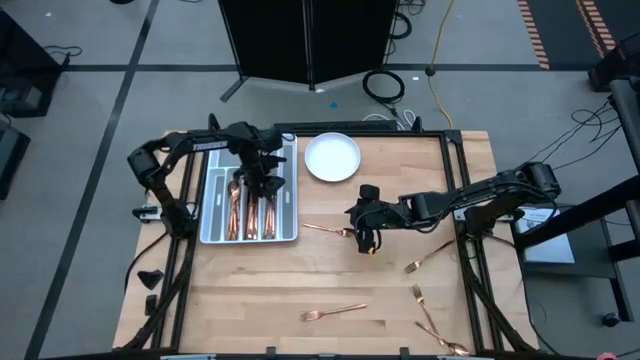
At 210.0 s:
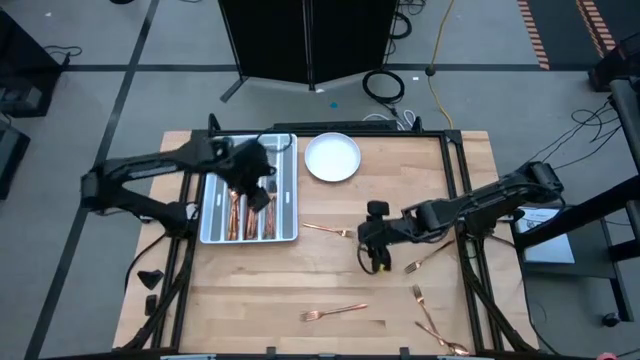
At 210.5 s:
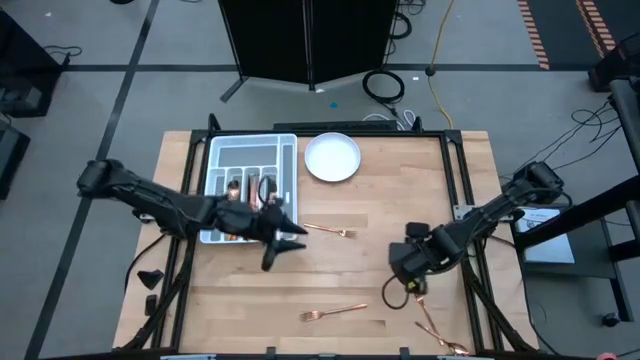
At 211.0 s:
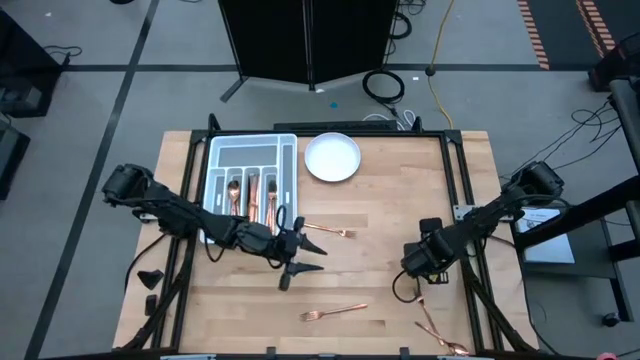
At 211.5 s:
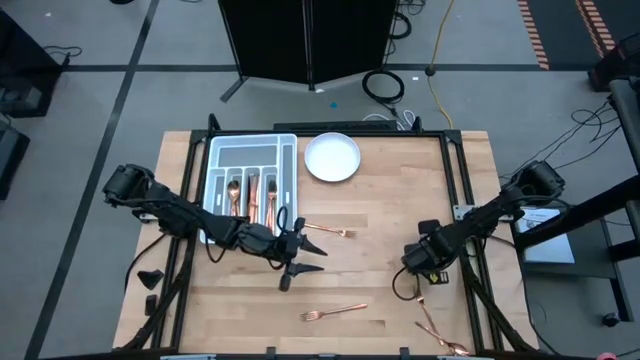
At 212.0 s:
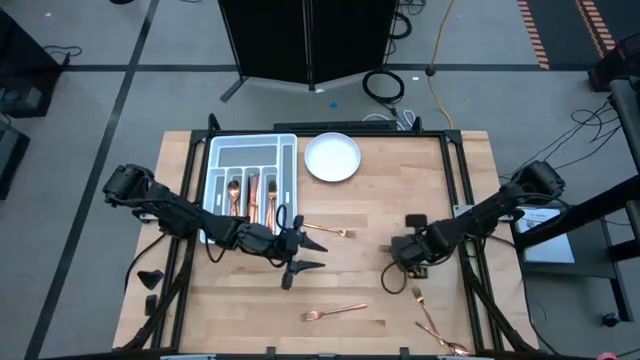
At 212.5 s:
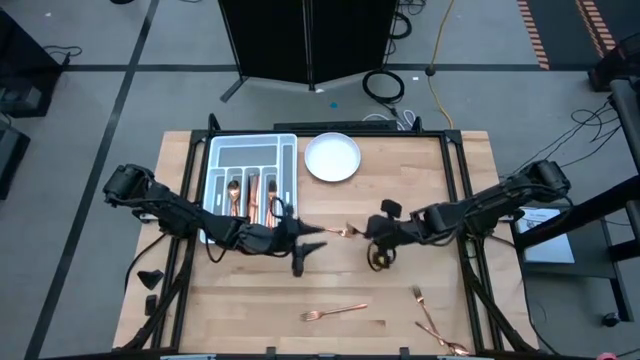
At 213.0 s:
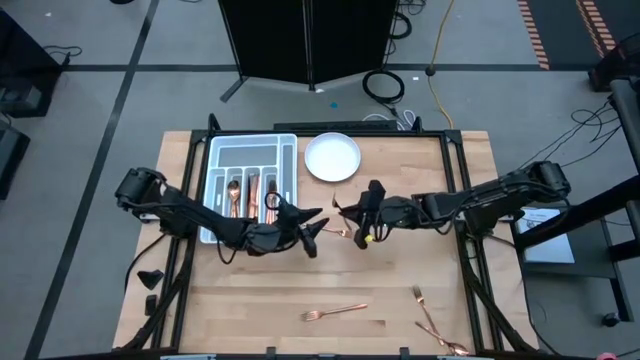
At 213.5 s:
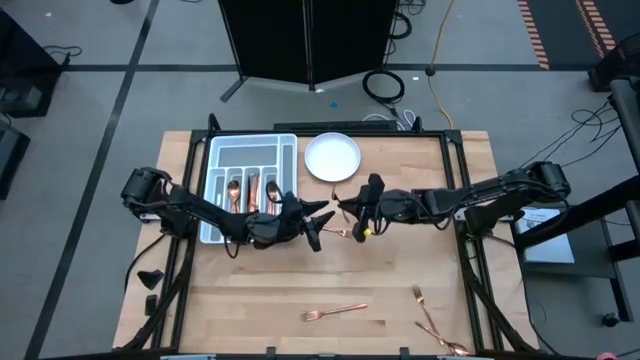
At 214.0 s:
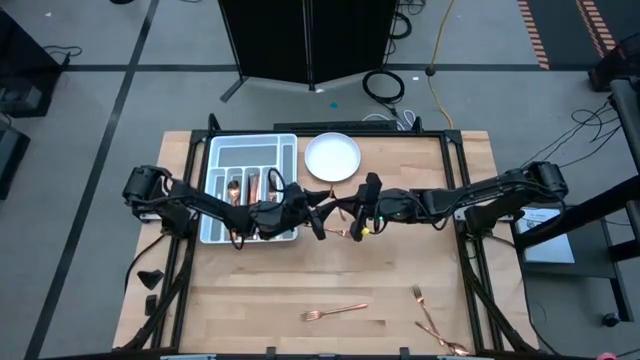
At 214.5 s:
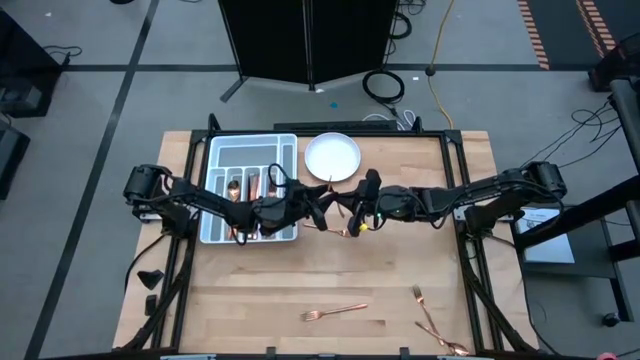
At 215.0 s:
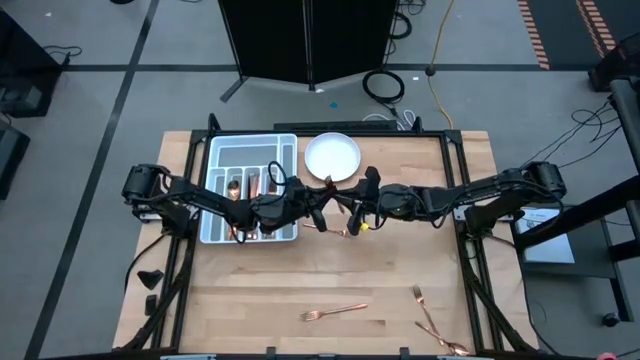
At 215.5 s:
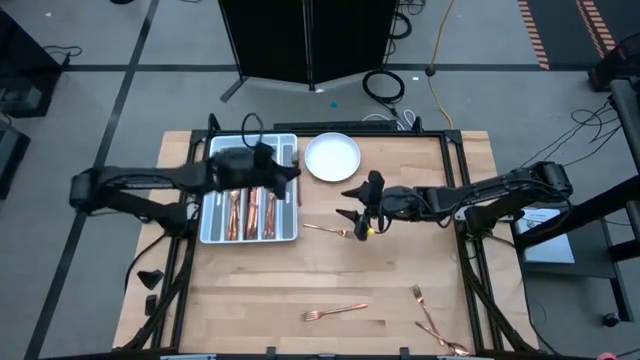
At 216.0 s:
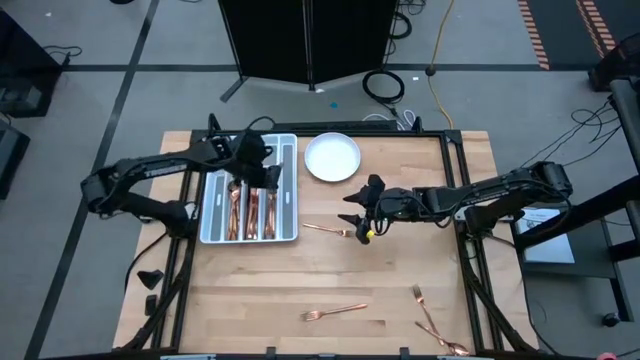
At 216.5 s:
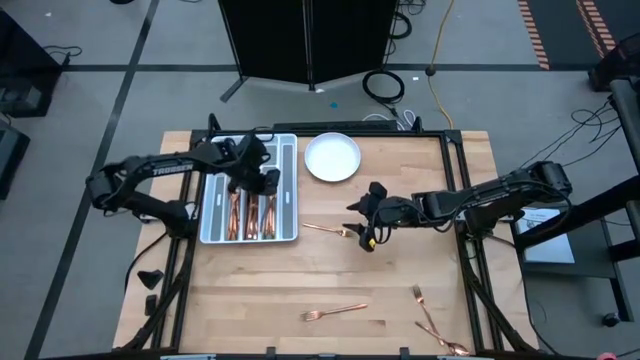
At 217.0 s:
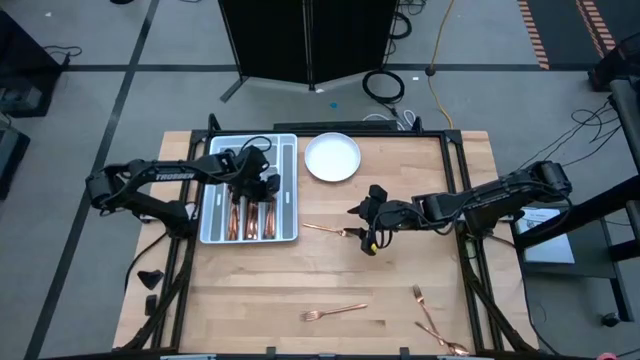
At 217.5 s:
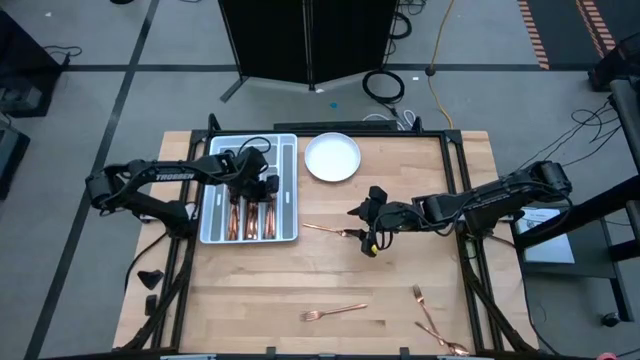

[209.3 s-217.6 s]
Task: Sort silverware
Put the fork on the silverware tray

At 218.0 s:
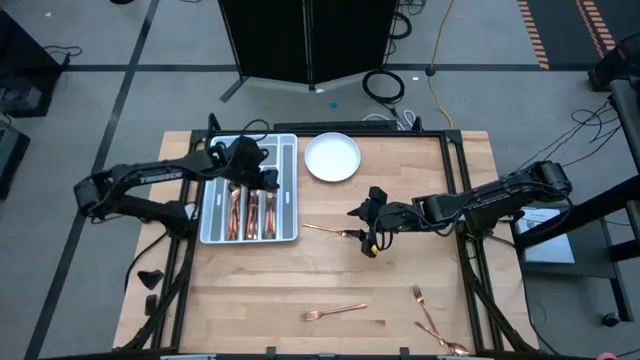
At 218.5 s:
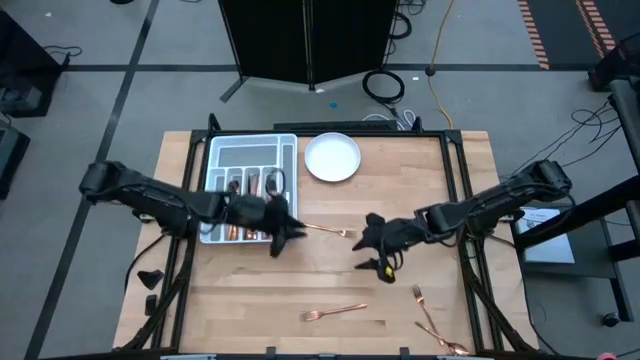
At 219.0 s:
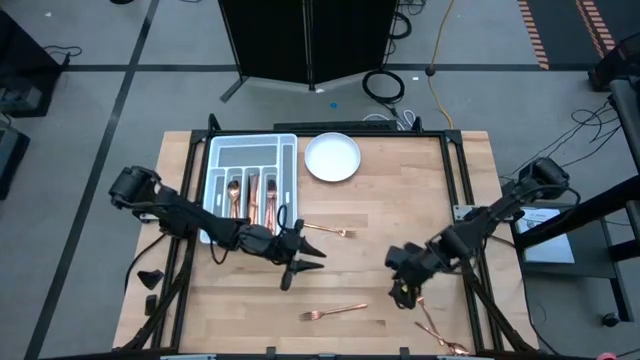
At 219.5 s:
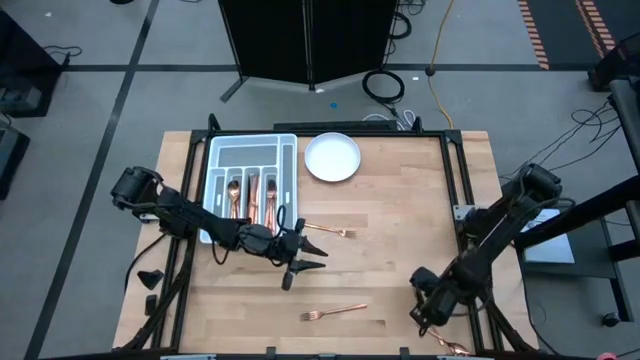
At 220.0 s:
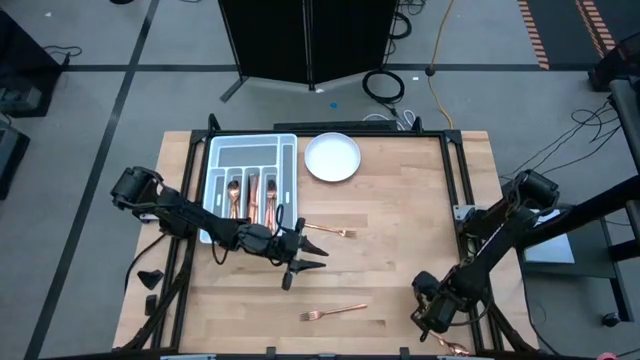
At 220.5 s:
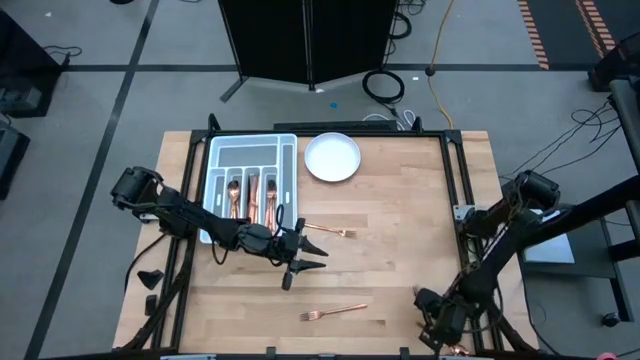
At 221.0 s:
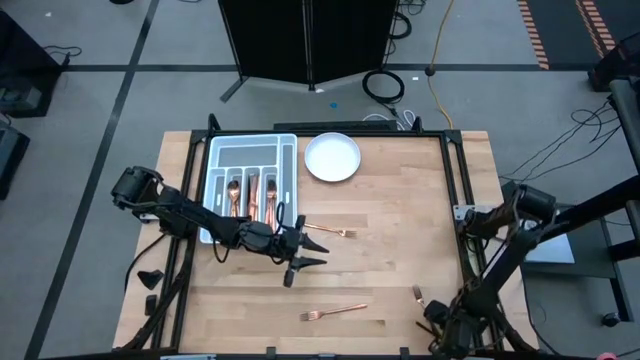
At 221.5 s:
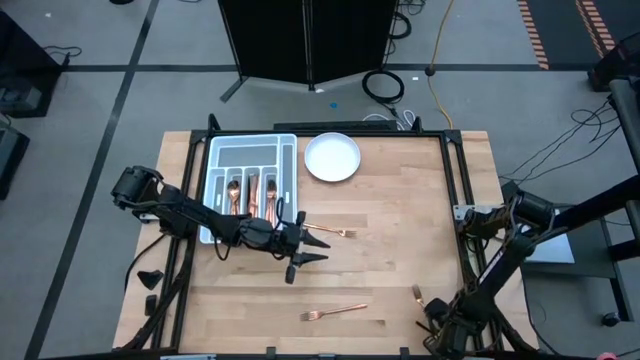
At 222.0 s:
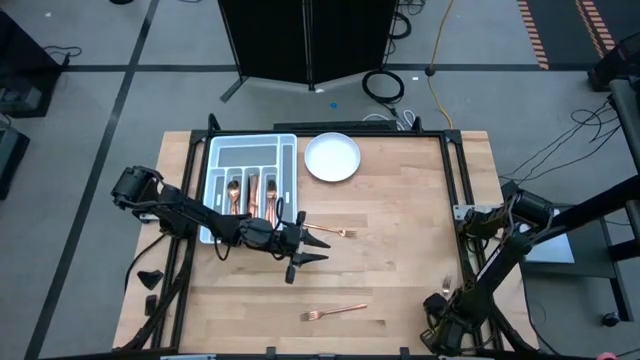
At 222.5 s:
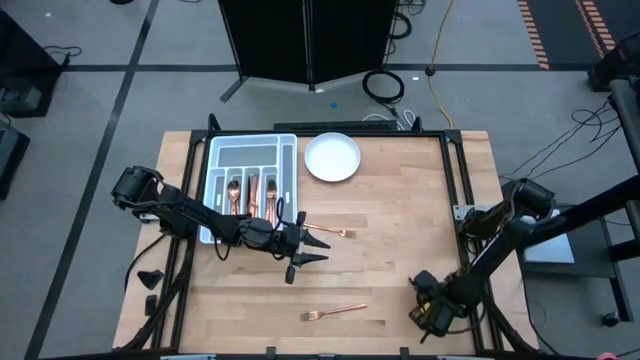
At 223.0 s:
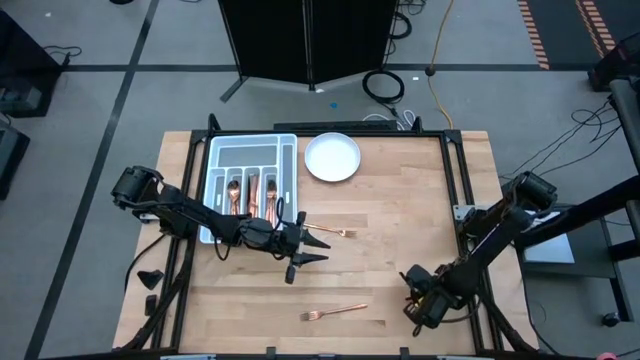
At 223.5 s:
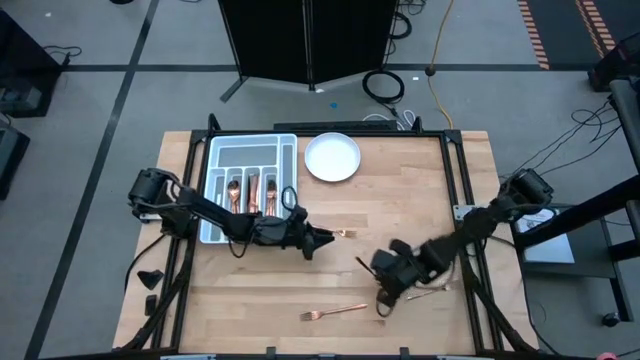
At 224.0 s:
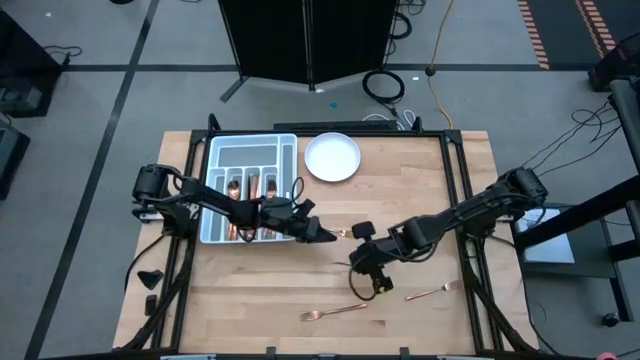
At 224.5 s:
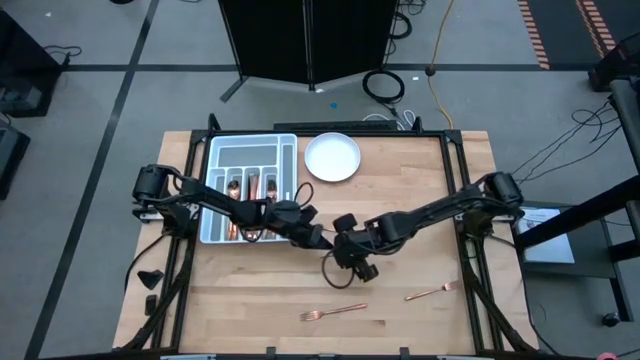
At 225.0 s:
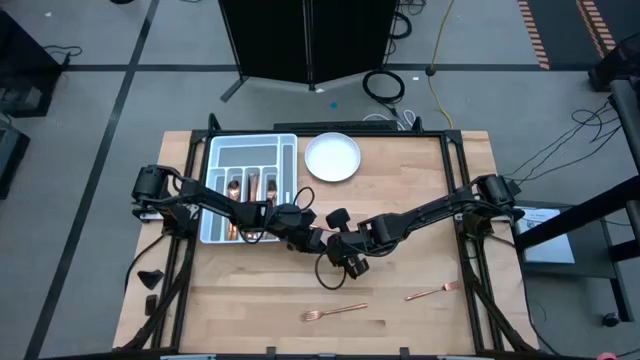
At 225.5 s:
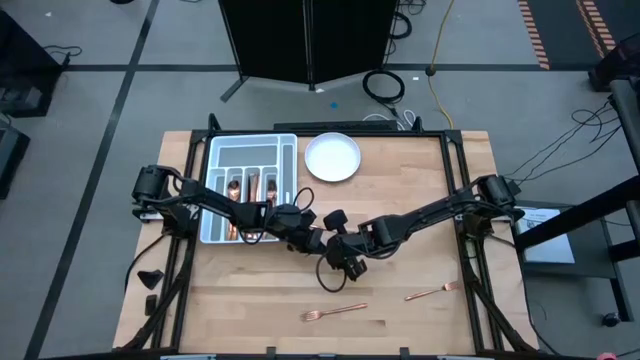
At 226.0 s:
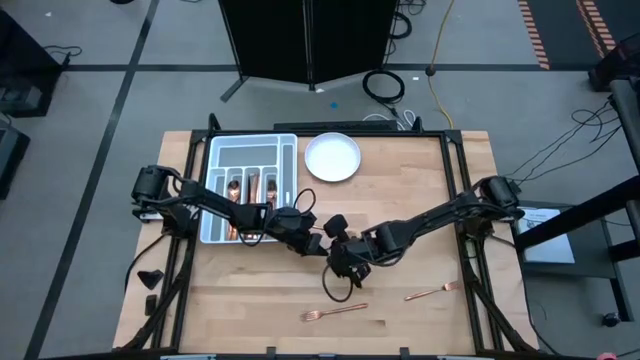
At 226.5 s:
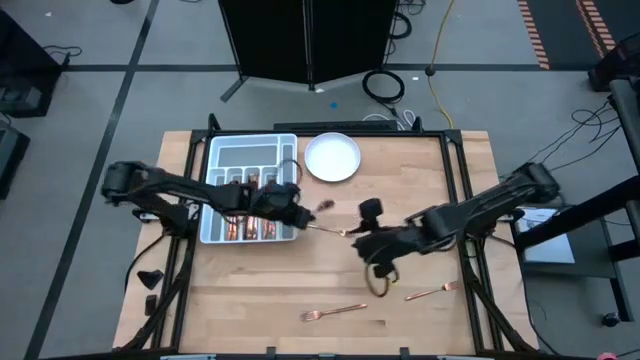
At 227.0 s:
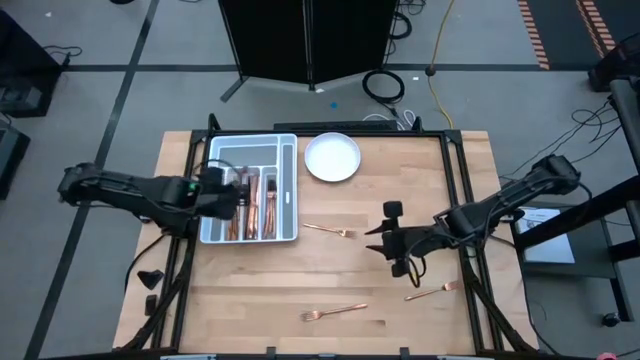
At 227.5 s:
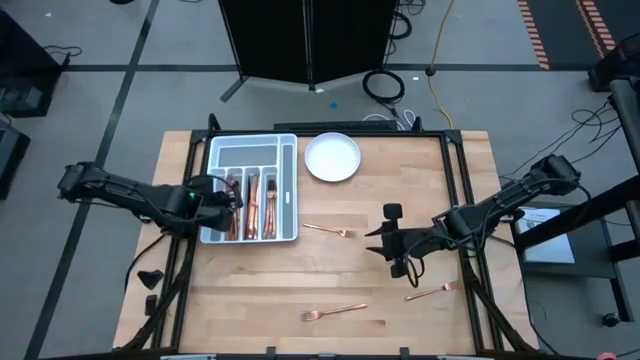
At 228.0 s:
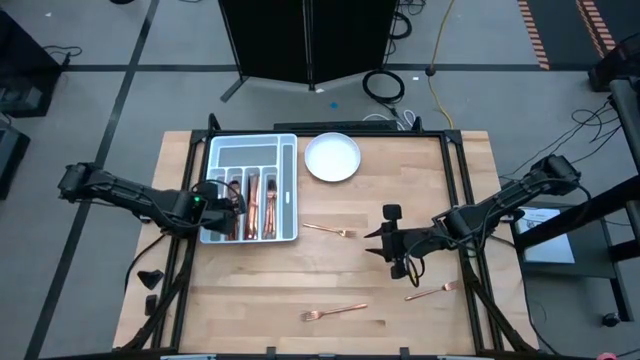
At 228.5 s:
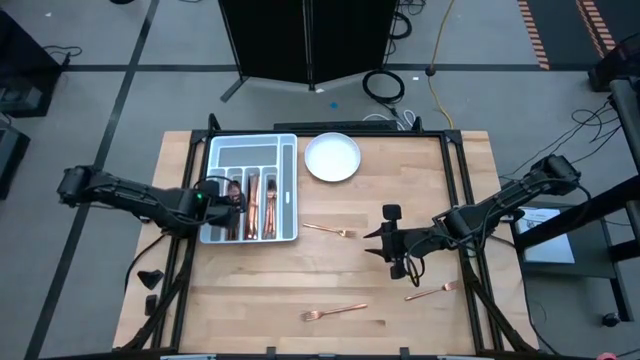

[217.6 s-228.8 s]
Put the spoon on the silverware tray
